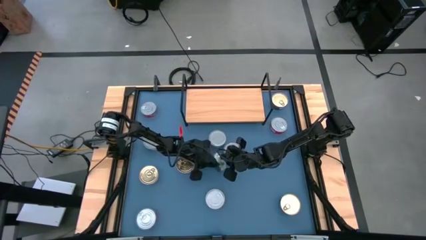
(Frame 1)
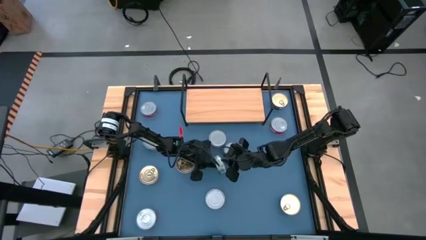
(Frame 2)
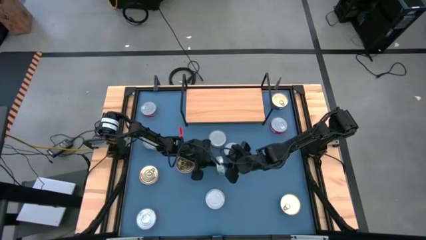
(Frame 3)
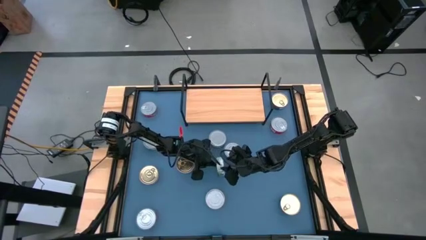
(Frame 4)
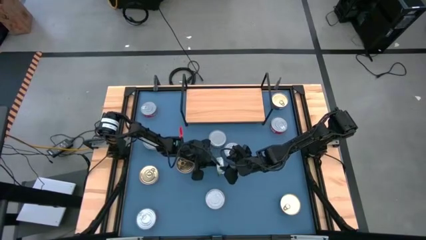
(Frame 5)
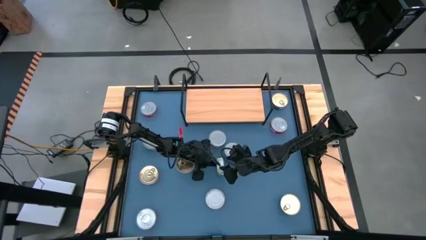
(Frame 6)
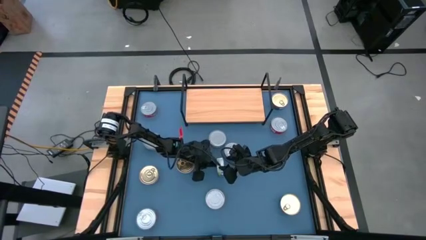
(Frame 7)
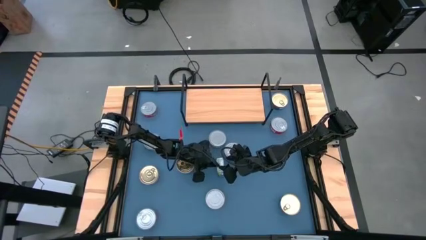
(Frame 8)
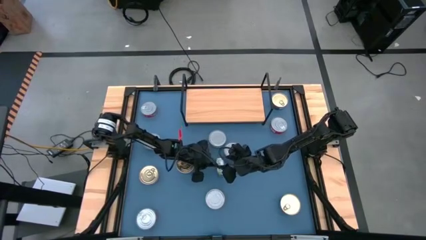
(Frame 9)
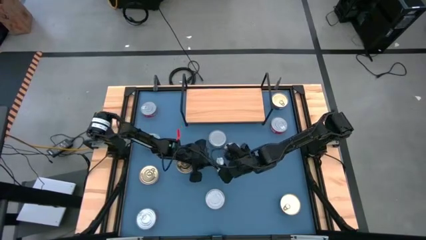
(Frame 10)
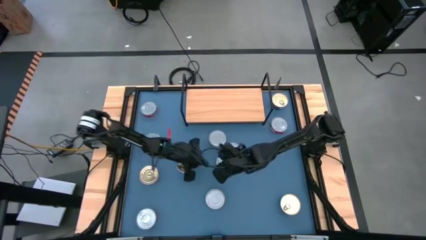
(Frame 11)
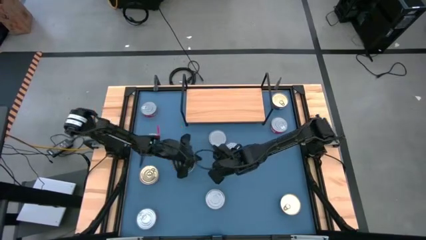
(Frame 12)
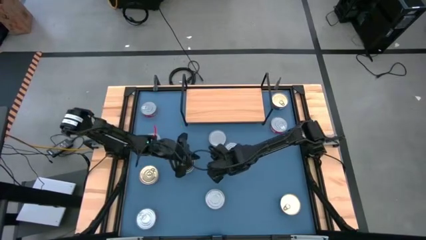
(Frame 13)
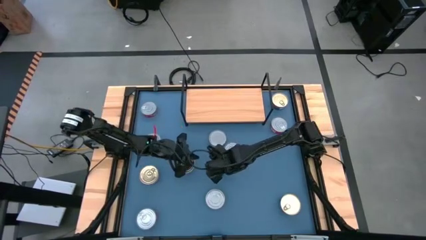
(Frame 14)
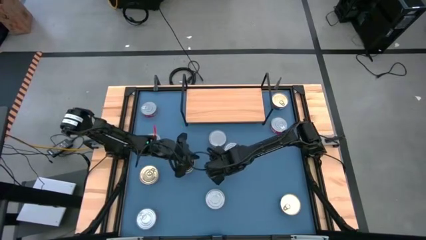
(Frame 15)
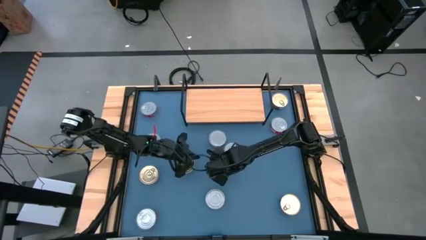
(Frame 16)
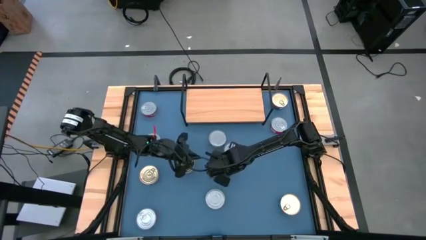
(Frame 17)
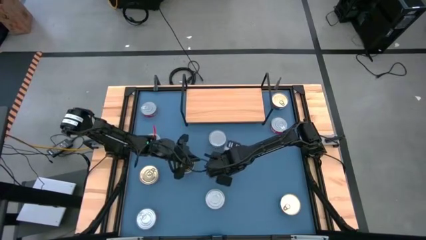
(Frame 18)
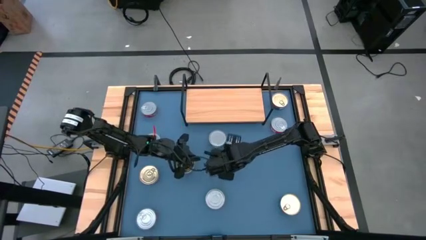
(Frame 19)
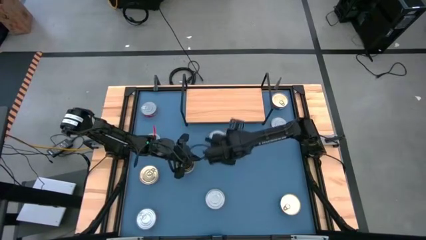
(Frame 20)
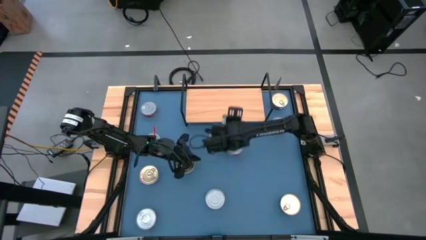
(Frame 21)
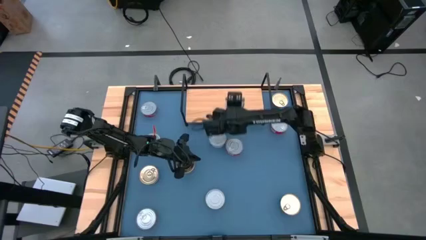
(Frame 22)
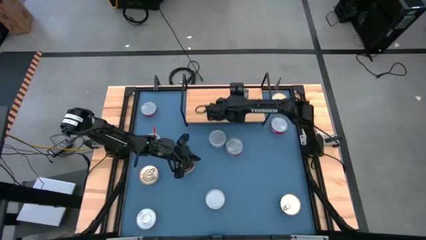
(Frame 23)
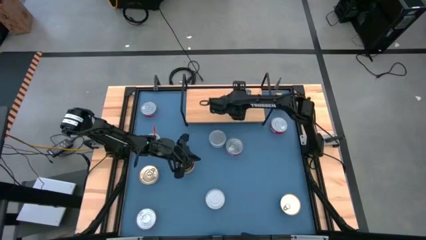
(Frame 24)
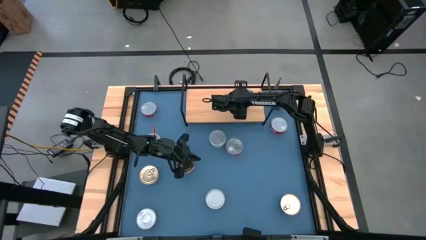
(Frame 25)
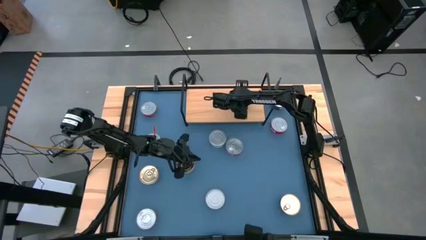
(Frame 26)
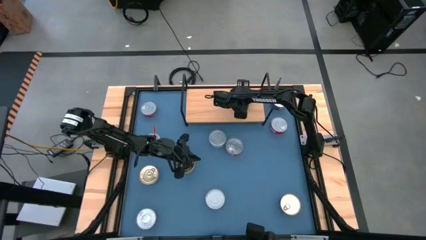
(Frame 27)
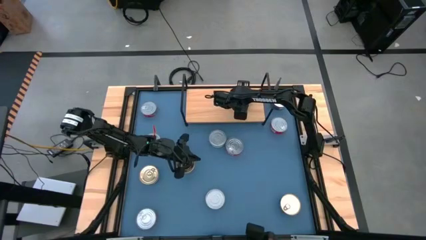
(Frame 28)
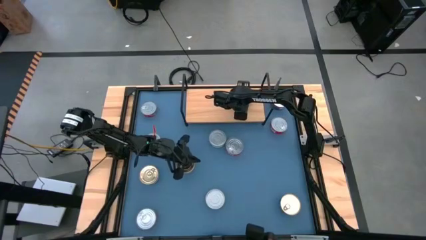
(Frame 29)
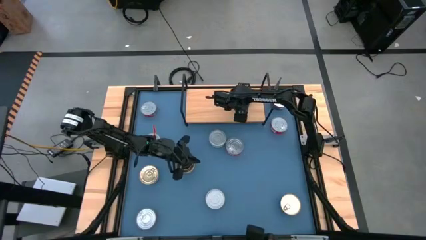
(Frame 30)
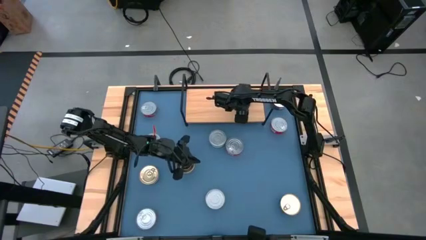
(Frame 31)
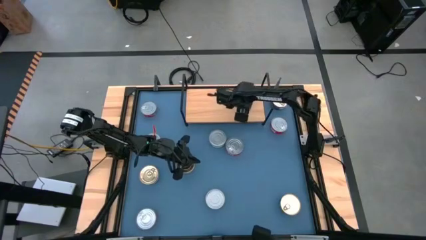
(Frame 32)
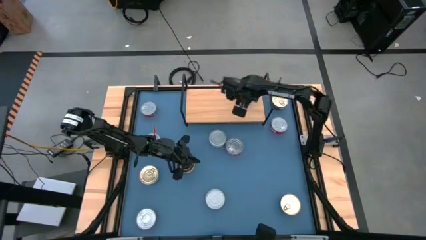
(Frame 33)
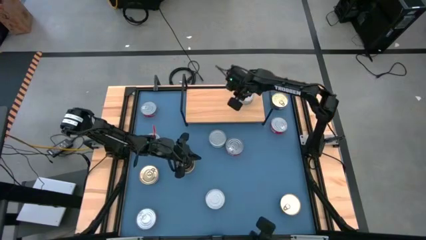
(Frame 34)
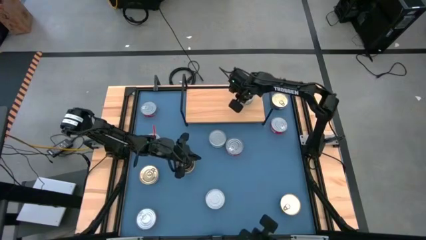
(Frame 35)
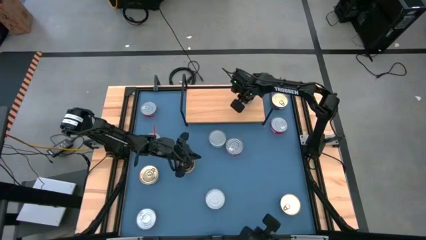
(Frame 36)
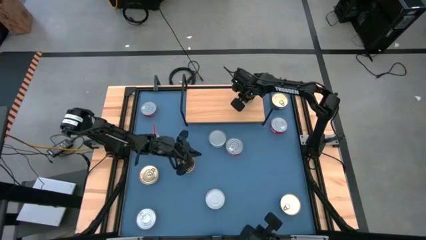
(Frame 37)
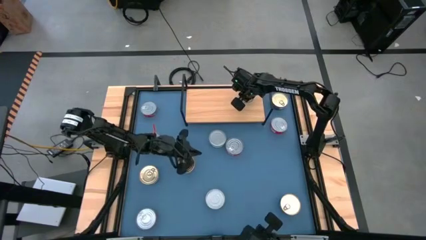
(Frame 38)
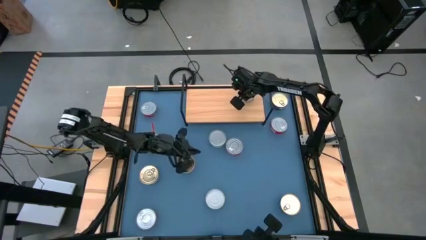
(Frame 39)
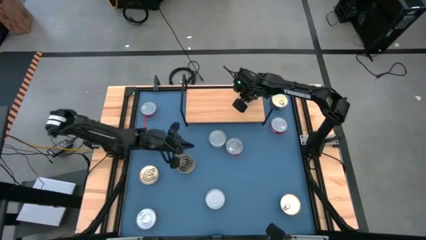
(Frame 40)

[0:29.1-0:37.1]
Task: Stack canned seafood by type on shelf
Put the green tuna can on the shelf

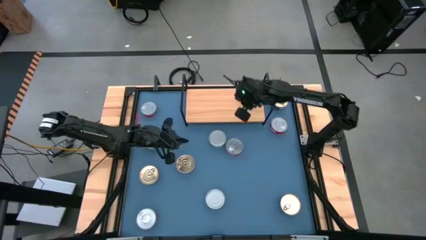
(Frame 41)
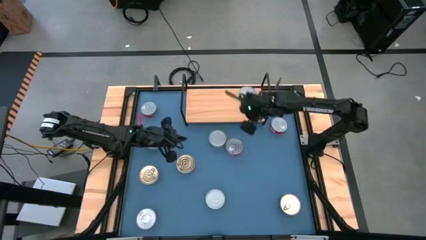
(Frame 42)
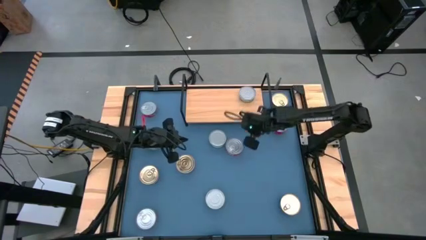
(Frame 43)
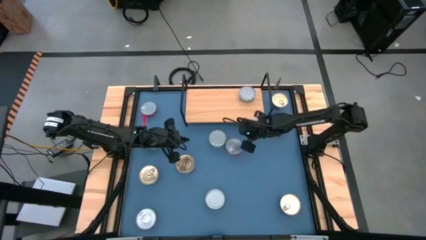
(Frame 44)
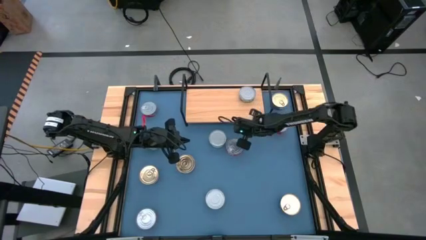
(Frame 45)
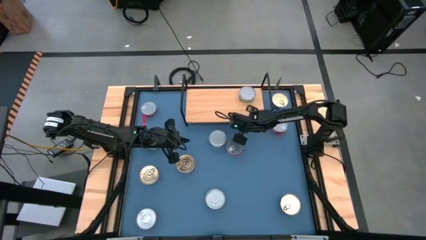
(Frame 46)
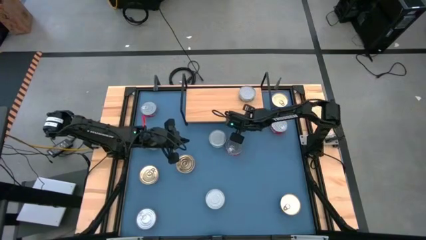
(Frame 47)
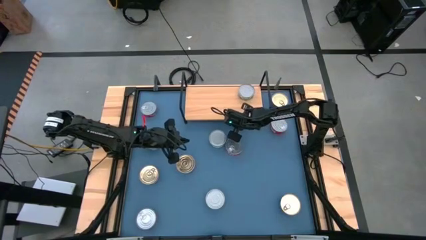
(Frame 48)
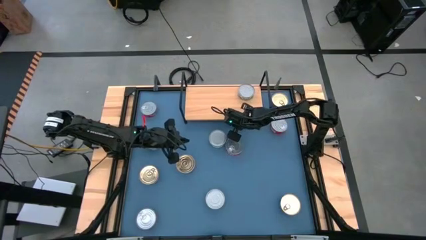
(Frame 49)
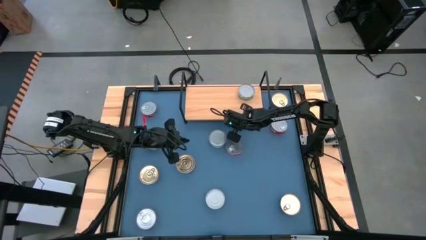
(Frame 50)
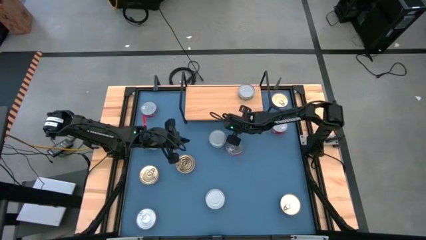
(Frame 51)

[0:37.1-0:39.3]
Adjust the shelf on top of the table

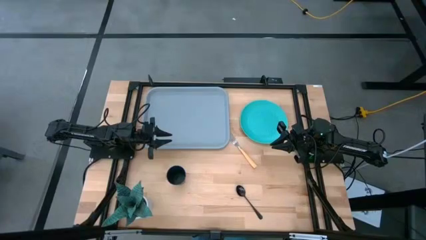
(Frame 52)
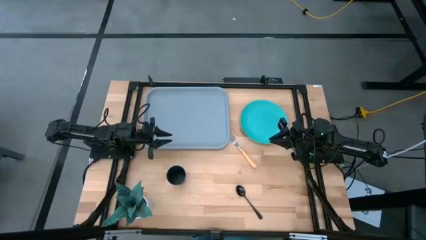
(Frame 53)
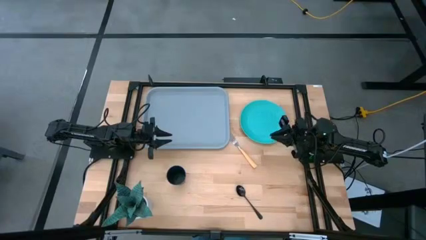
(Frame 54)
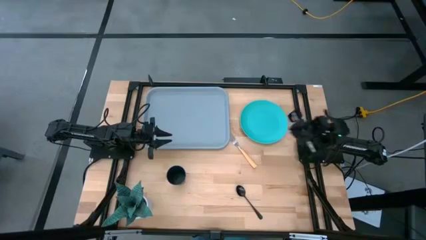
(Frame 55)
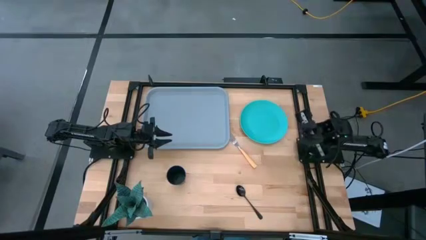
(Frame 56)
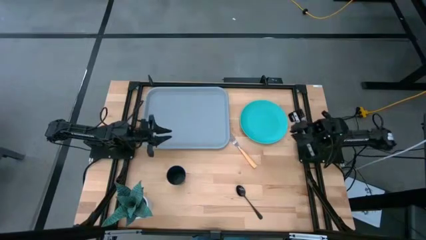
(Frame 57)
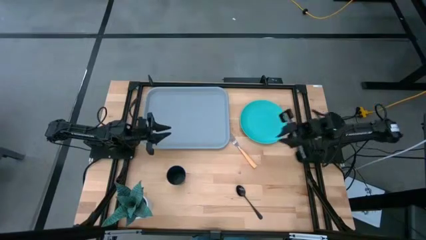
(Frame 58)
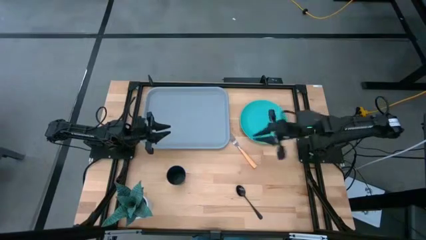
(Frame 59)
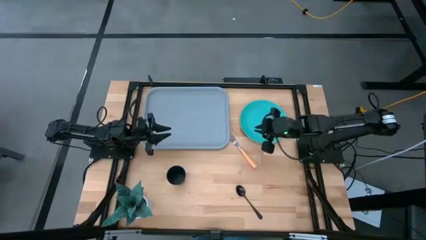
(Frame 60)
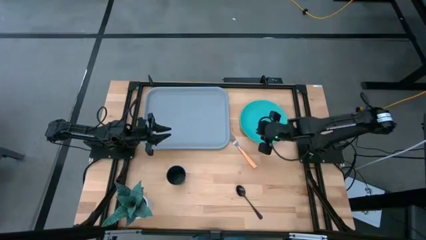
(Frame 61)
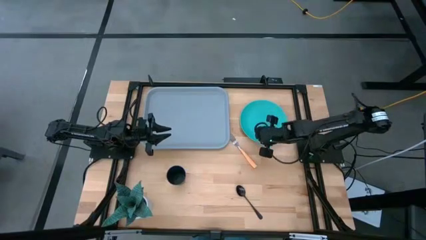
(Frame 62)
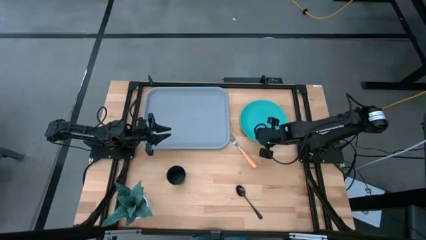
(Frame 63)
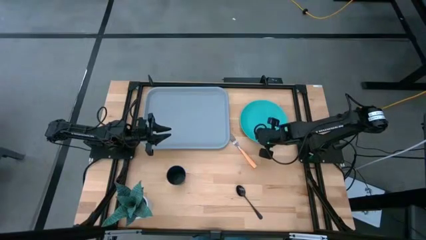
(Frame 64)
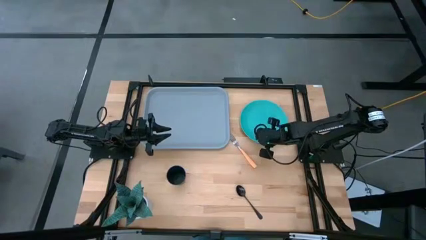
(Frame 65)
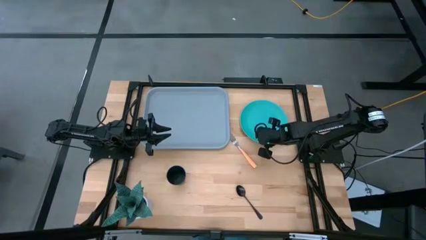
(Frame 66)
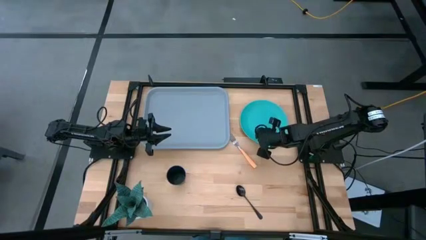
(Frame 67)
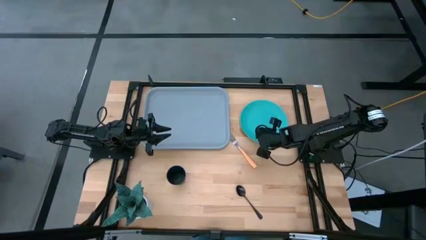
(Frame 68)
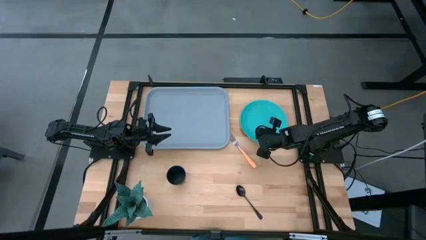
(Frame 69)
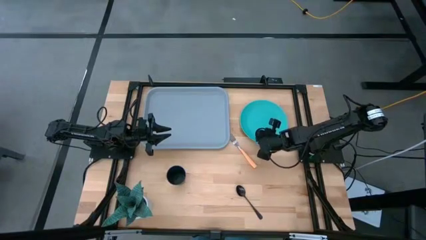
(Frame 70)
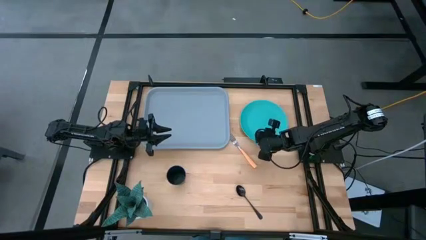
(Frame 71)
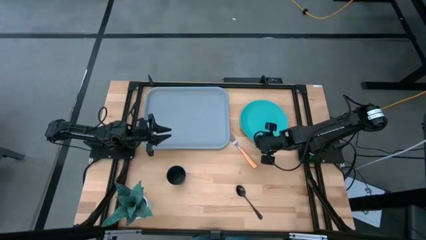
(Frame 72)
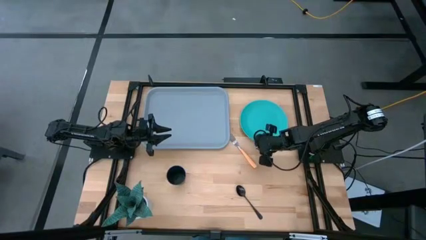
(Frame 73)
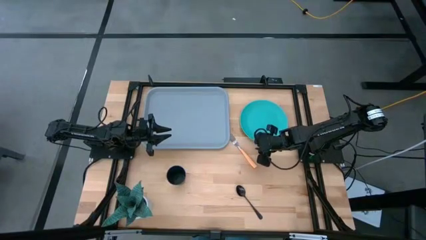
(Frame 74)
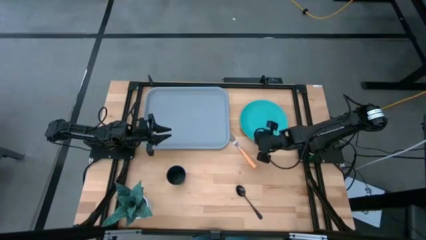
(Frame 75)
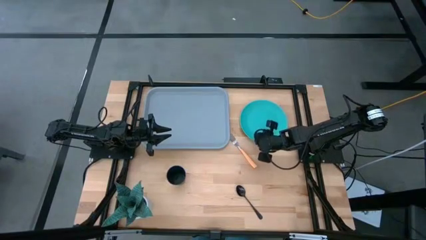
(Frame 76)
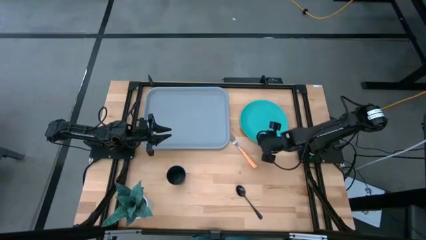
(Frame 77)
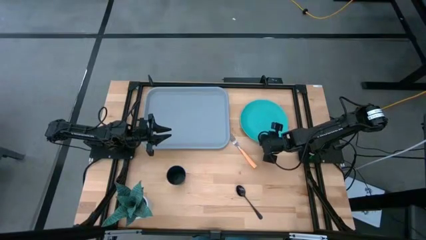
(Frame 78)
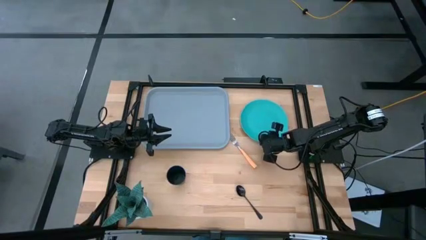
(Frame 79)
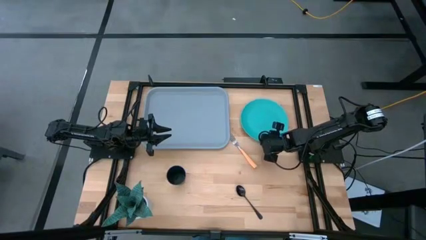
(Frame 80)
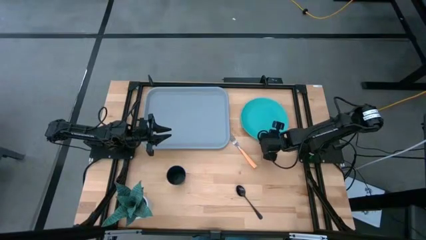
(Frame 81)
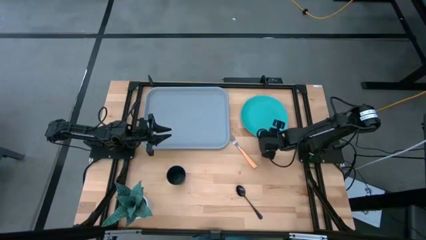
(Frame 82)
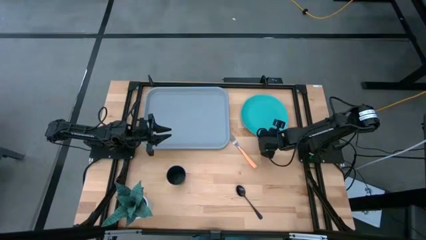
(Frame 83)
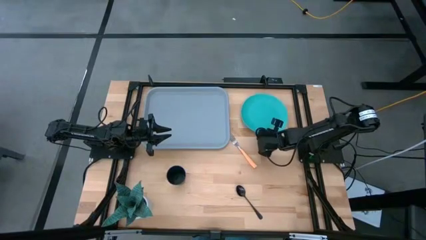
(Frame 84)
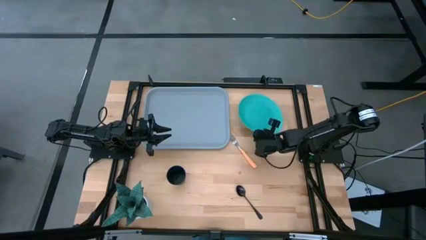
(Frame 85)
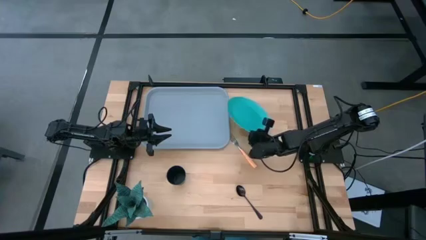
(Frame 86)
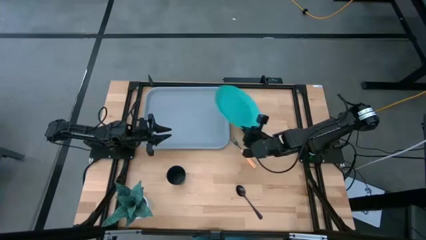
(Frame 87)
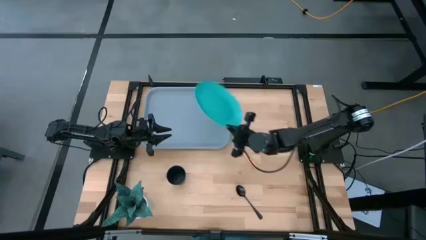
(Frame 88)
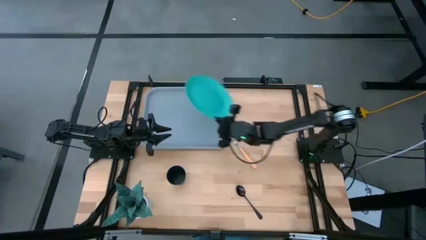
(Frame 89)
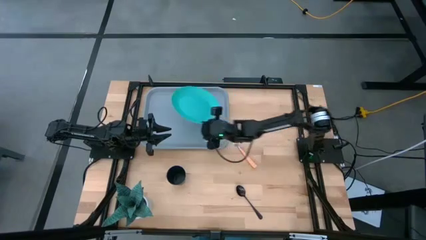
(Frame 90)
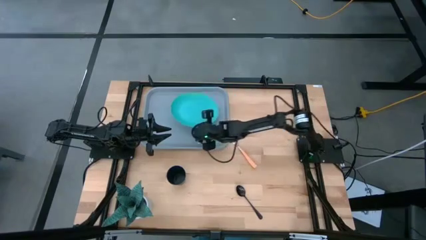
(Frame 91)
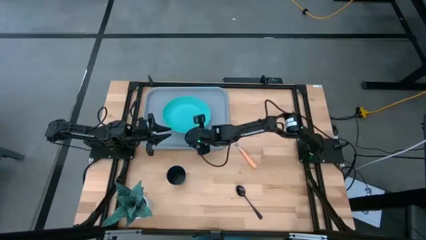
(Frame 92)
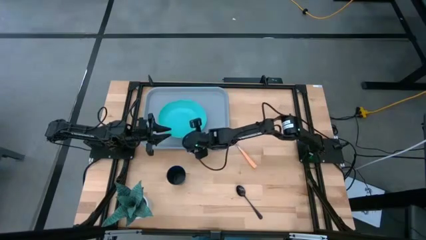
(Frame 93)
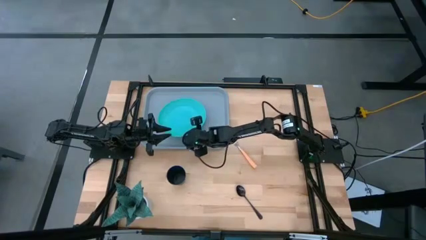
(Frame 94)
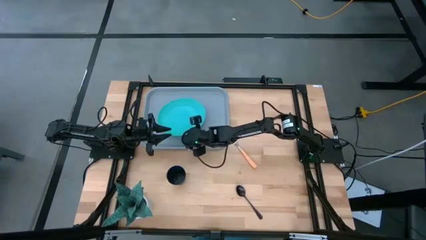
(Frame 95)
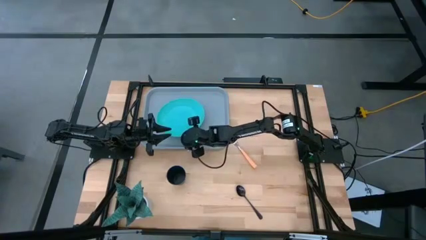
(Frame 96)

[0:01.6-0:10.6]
Task: Pick and place plate/cup/fork/spoon on tray
Put the blue plate on the serving tray
